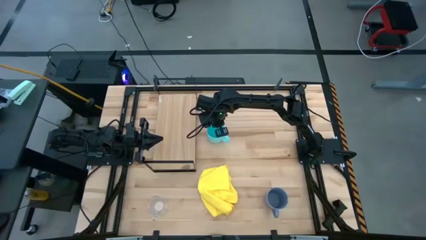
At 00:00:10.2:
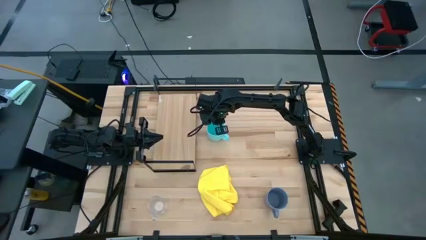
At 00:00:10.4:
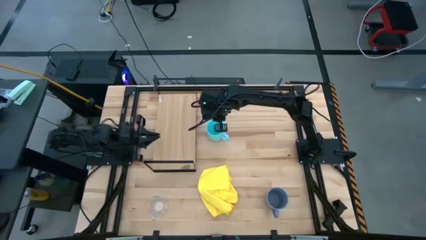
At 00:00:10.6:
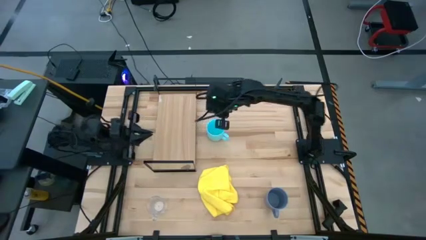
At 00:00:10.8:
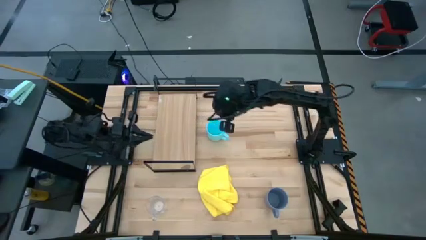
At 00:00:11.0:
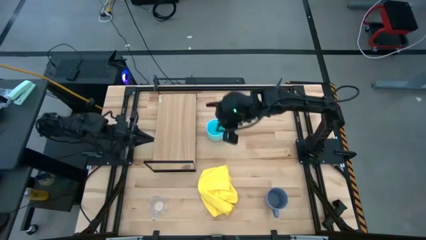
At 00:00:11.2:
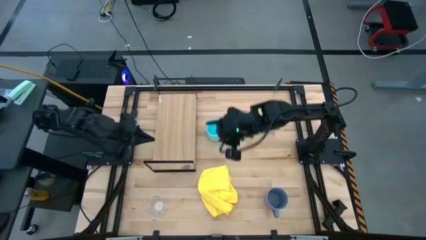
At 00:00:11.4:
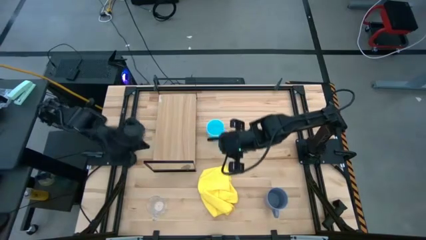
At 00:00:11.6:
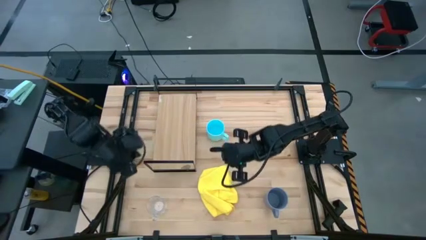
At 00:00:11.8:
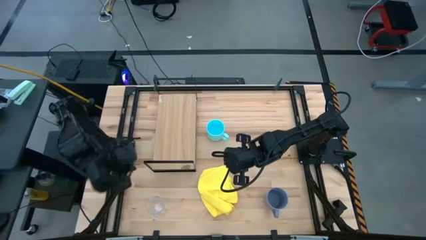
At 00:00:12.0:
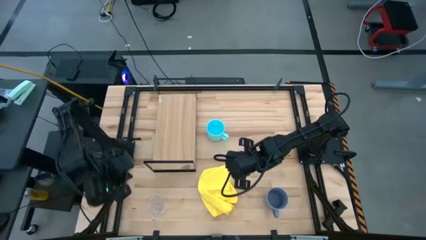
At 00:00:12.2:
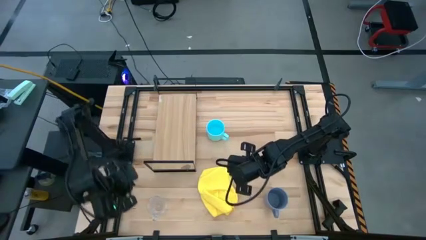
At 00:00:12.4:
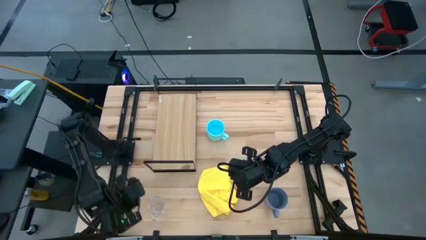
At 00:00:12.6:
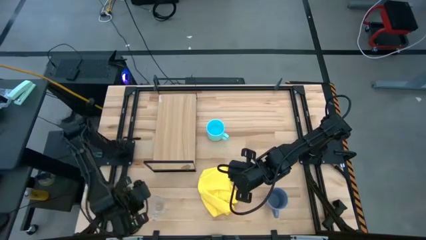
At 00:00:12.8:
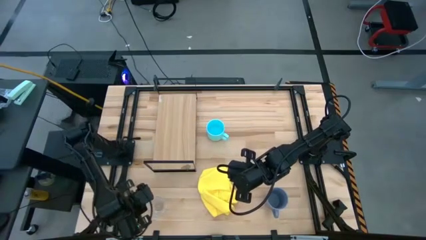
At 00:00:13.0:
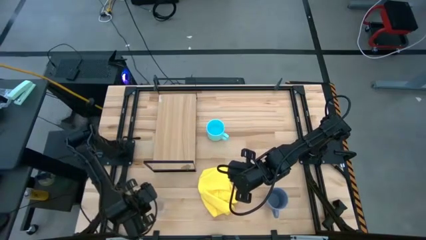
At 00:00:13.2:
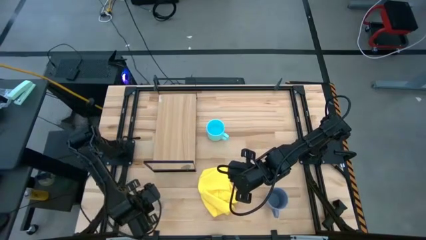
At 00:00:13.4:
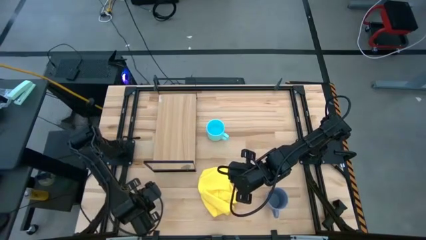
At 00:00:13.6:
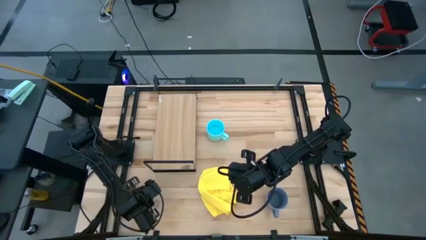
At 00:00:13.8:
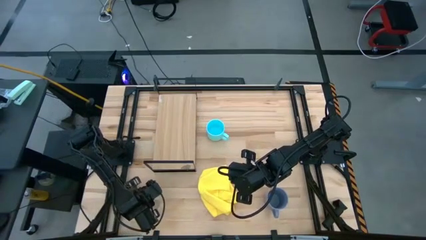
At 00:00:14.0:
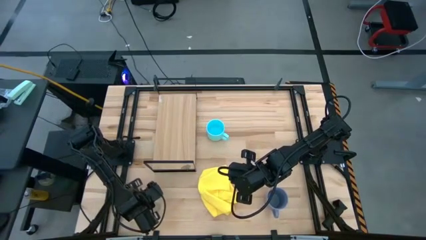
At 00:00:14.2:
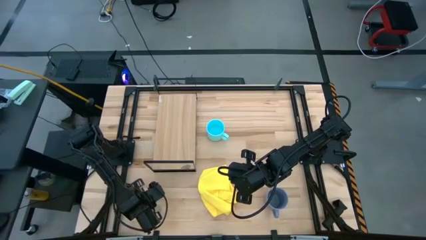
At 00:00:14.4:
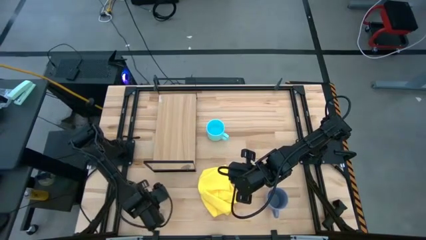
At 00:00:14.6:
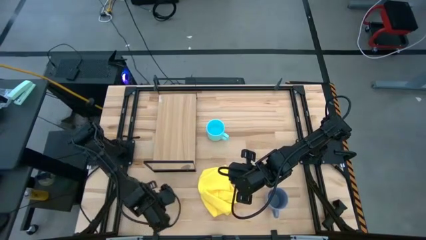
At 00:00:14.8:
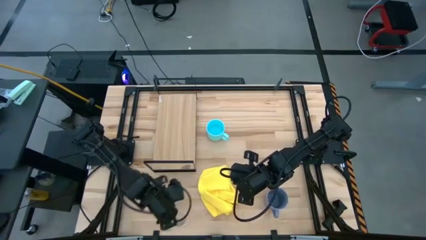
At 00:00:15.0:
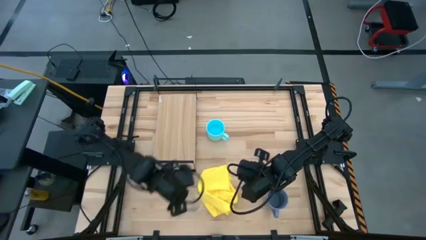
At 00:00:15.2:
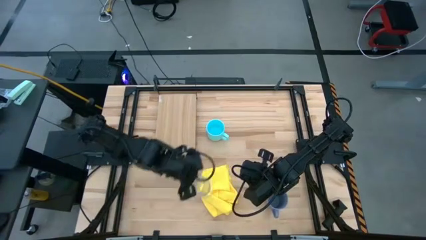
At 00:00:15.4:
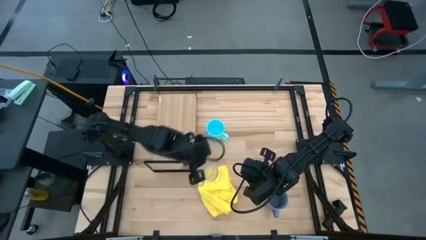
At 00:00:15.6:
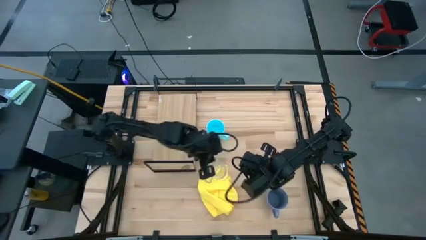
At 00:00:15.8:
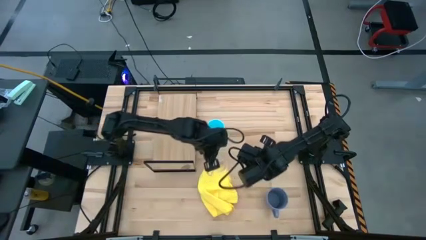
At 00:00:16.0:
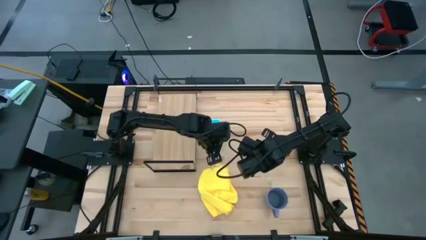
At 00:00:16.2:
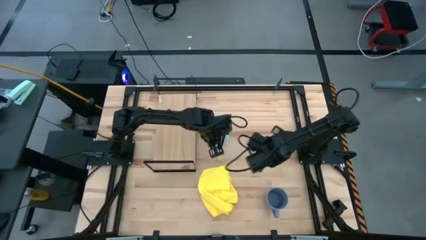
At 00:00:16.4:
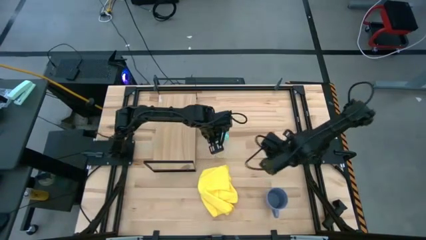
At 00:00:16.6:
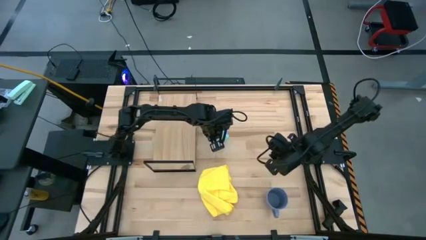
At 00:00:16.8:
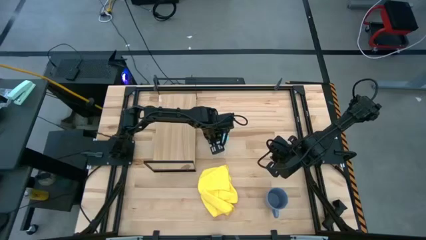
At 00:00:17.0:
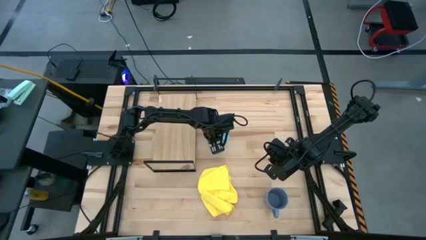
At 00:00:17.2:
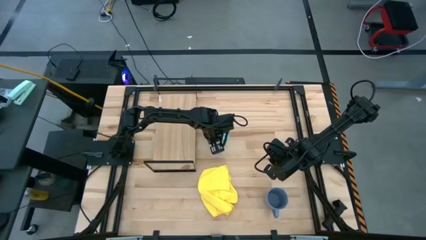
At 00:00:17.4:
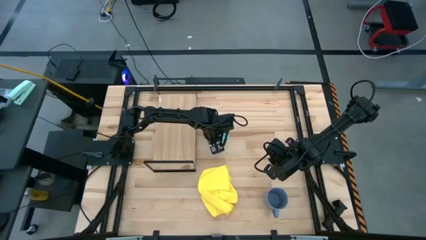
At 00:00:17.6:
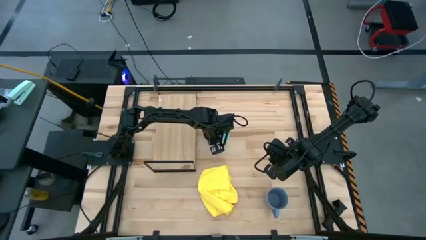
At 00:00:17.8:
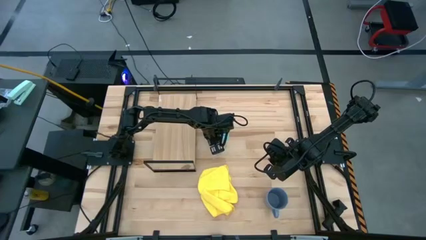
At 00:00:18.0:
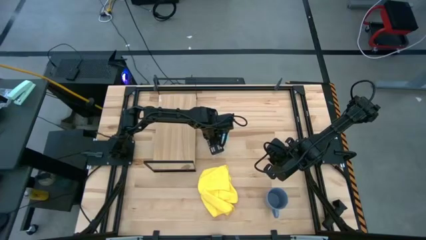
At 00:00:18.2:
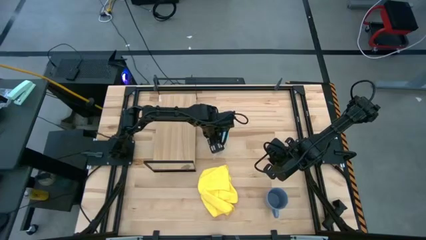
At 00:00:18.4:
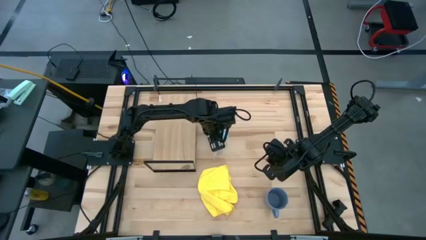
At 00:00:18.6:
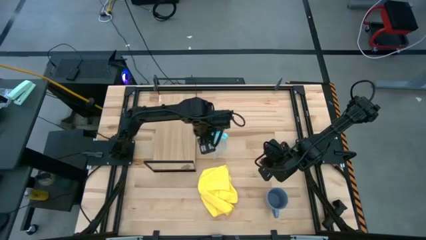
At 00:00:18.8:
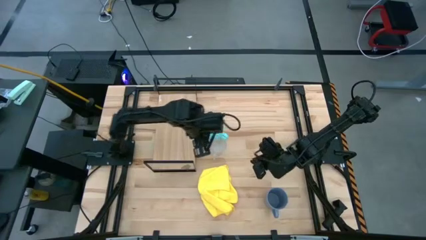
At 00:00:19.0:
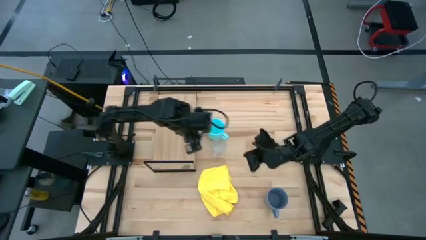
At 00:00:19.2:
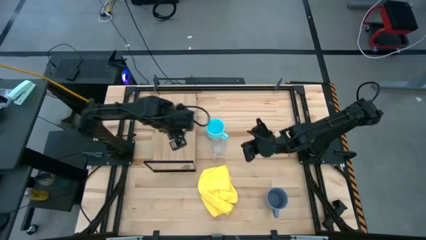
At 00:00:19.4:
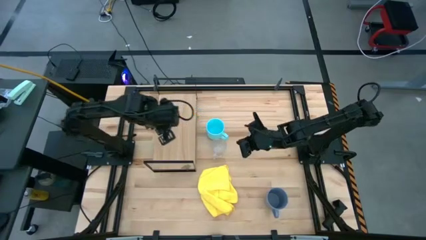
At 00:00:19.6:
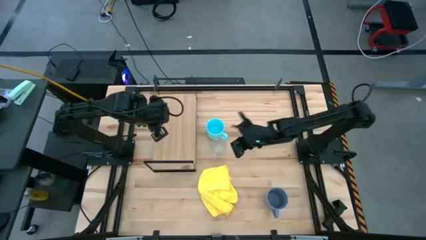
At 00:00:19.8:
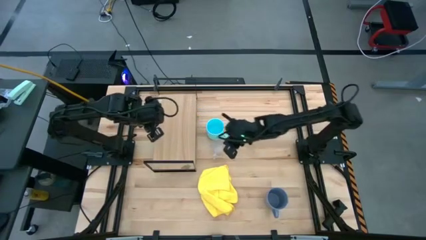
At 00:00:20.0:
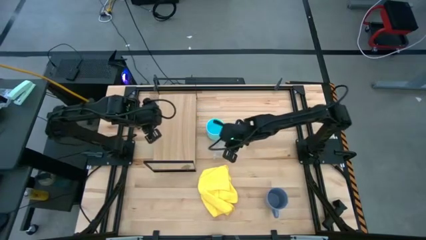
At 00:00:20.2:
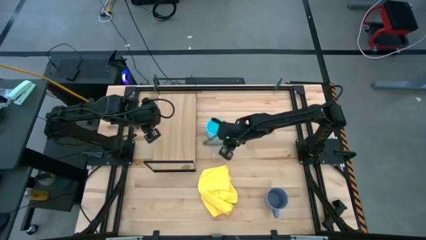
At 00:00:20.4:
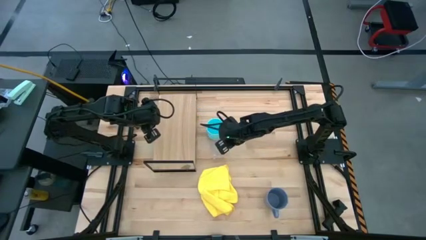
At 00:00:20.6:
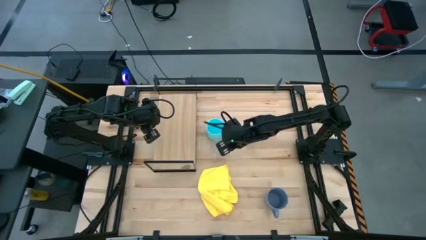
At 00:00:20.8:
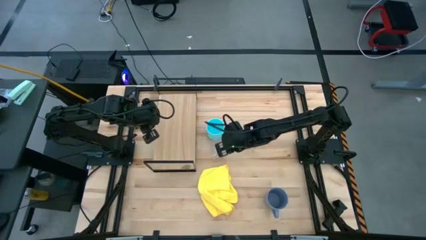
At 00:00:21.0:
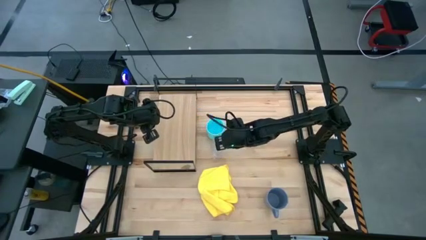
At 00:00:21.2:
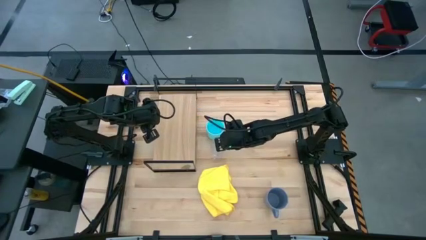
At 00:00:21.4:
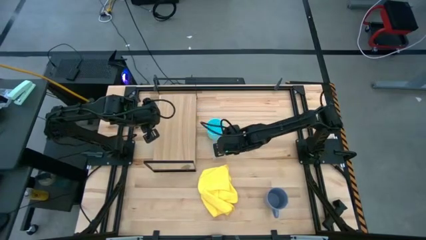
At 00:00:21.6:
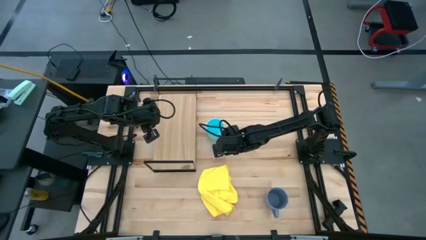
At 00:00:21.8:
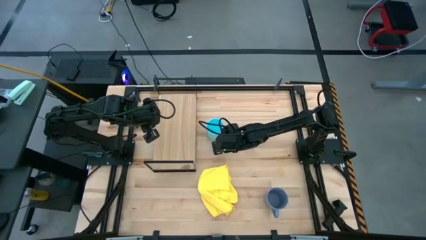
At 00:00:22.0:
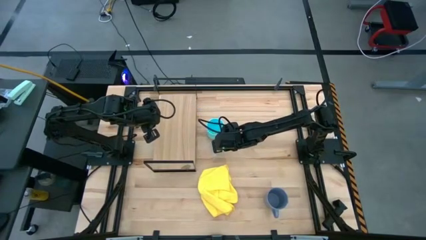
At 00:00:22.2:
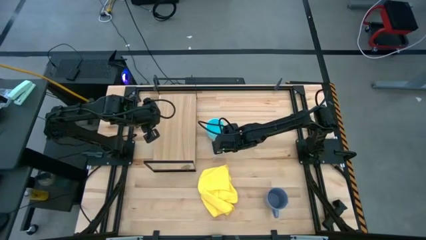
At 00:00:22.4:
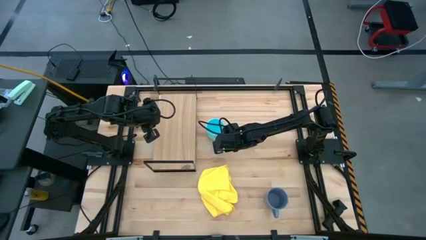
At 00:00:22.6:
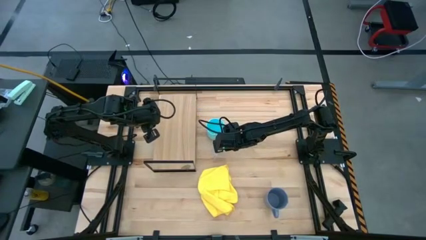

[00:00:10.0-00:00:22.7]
Task: Stack small to large cups/mugs on shelf
Put the transparent mug on the shelf
